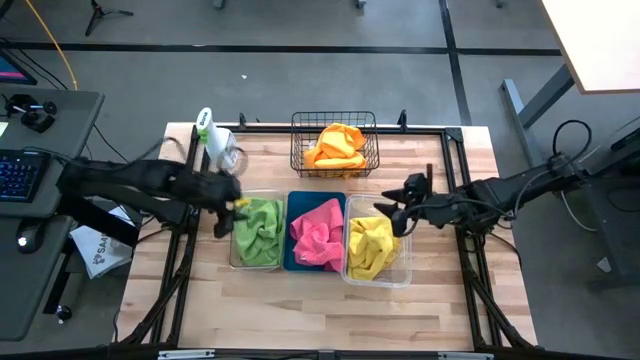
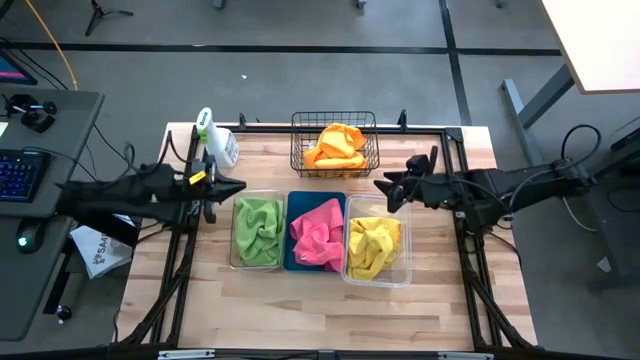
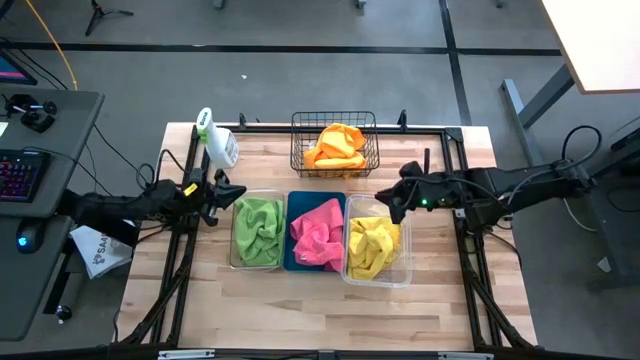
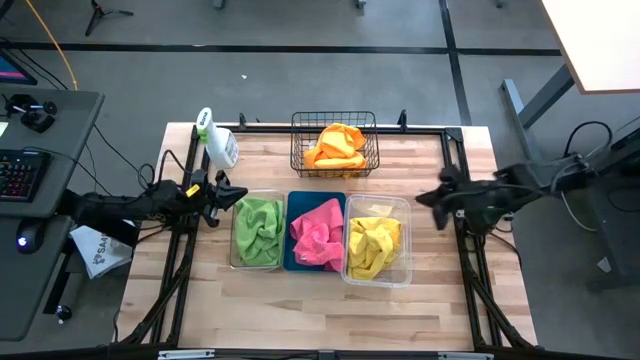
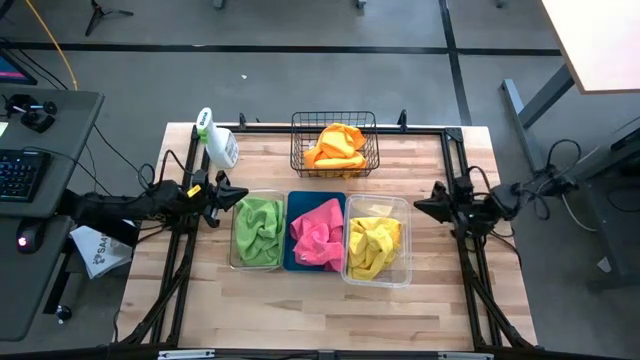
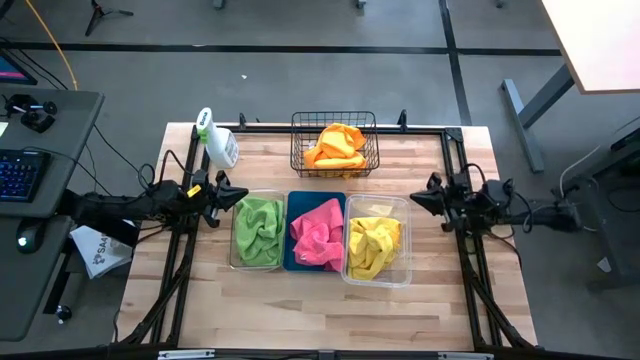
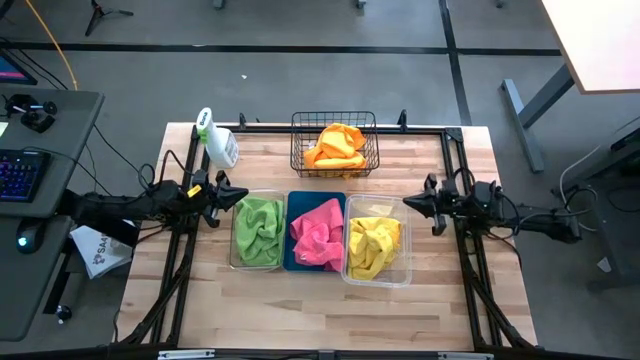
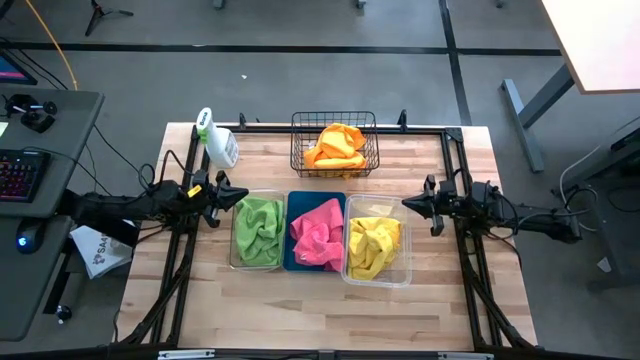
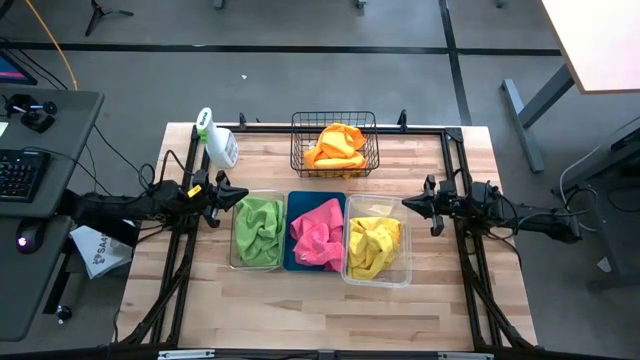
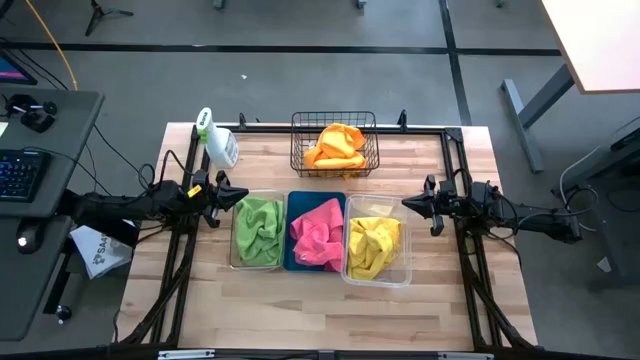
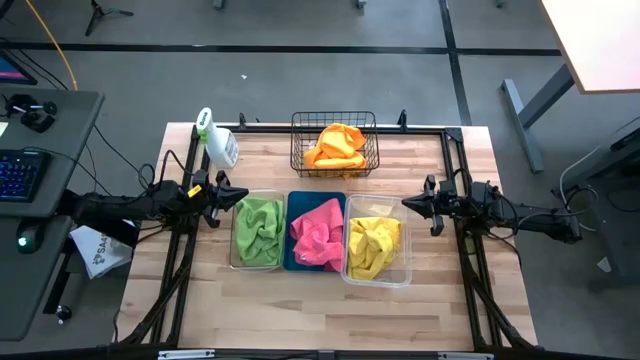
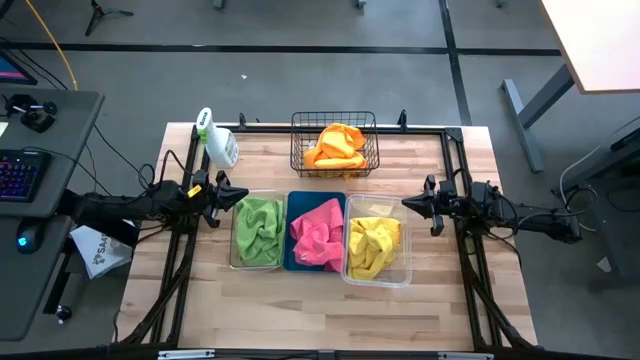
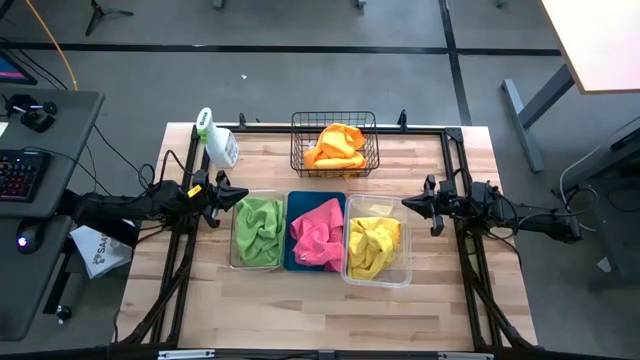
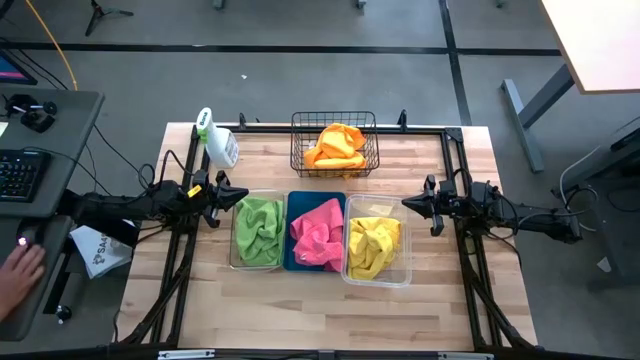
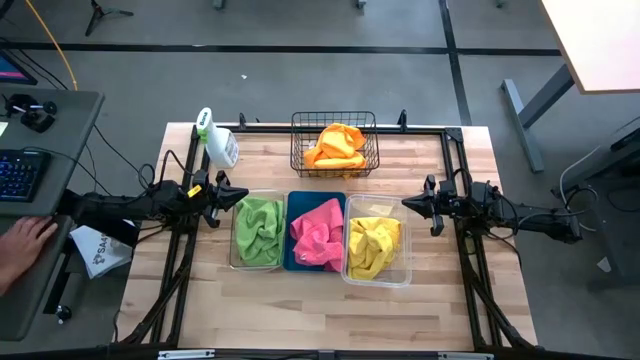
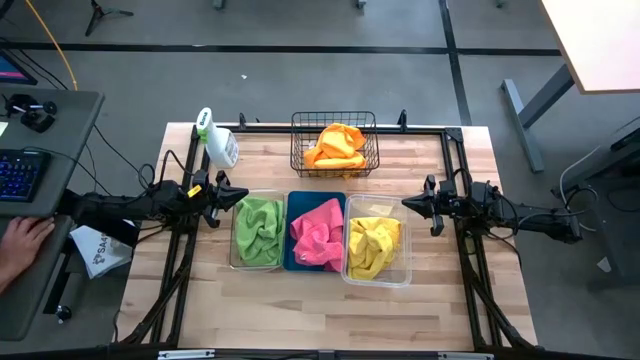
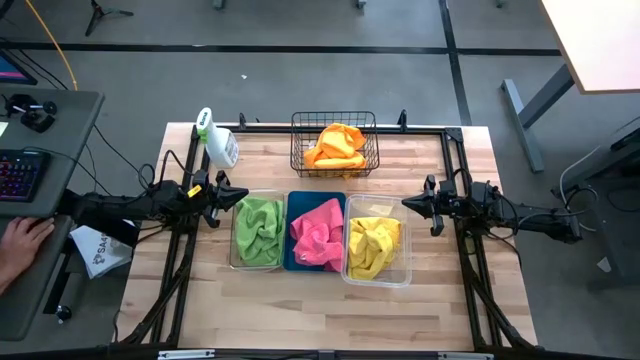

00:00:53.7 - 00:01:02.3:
Task: Sort microfiber towel by color & place in baskets
Return to Home Position

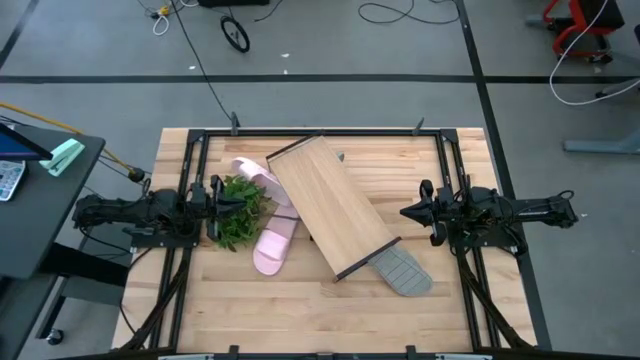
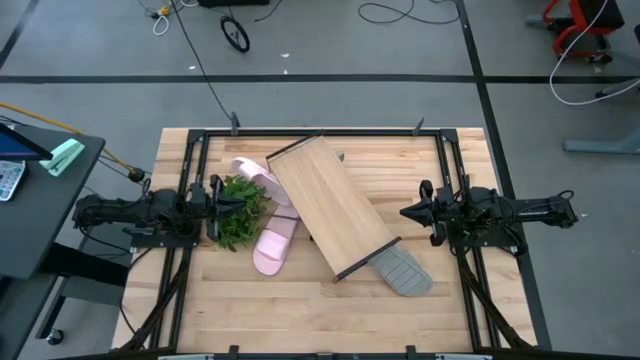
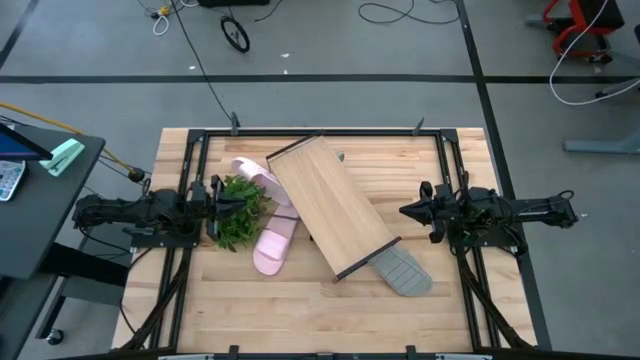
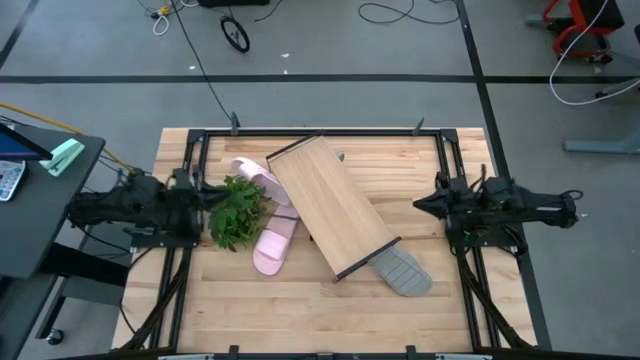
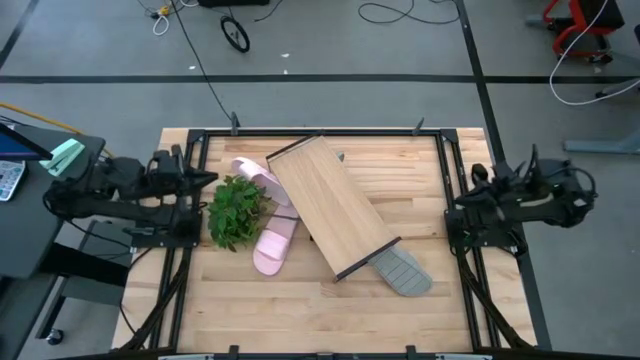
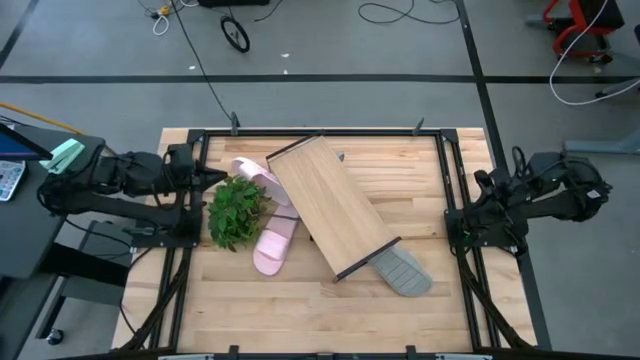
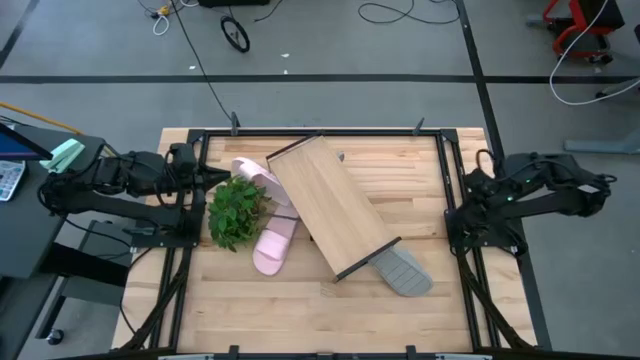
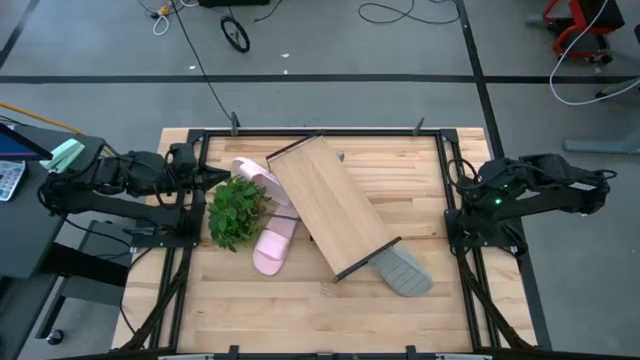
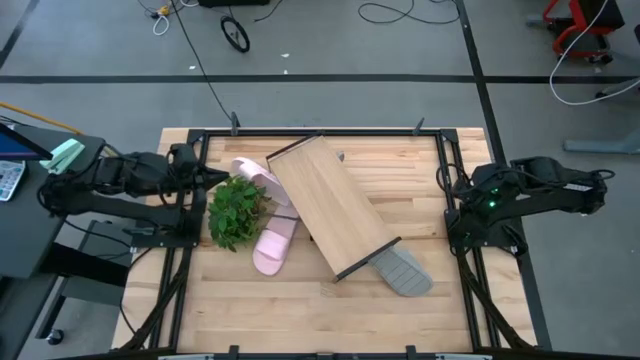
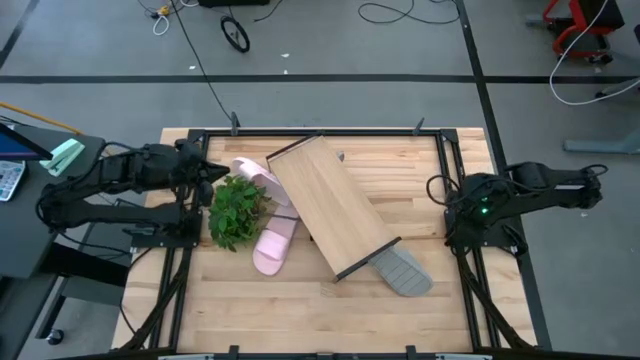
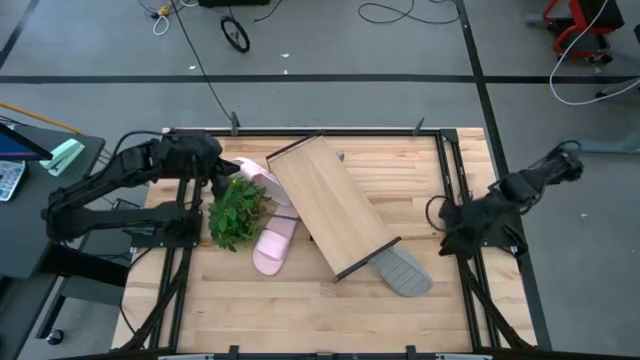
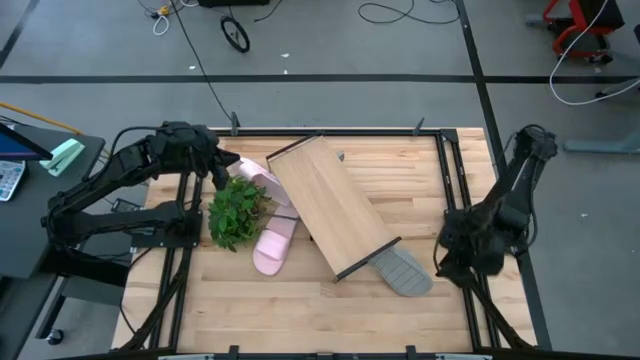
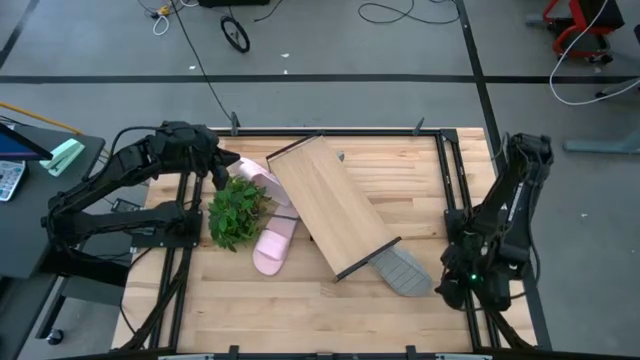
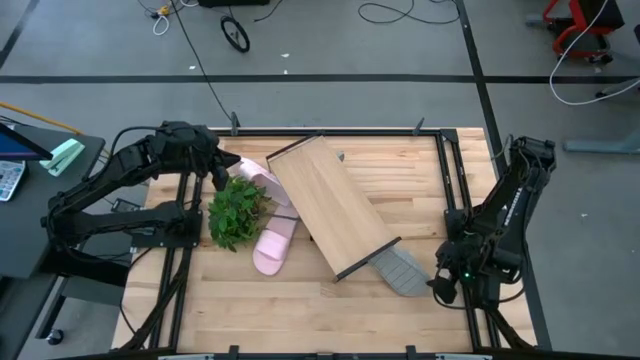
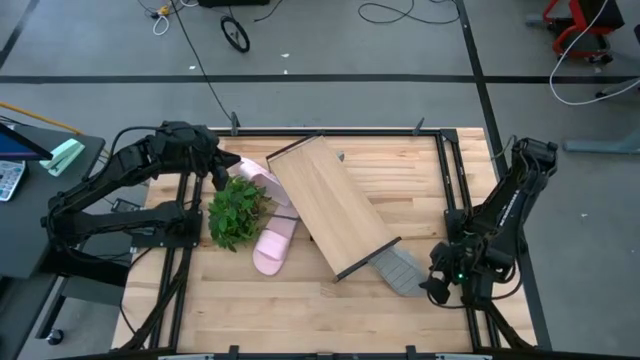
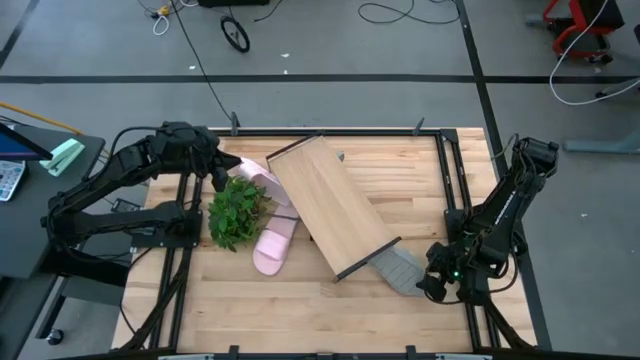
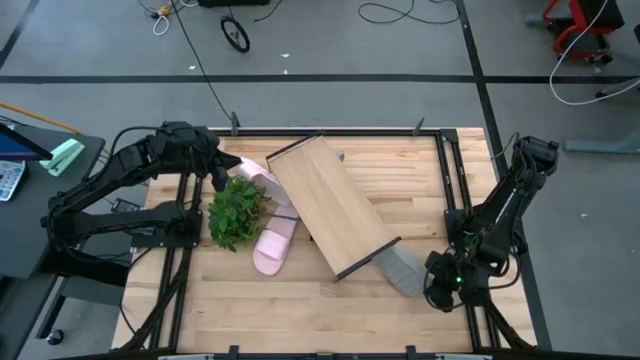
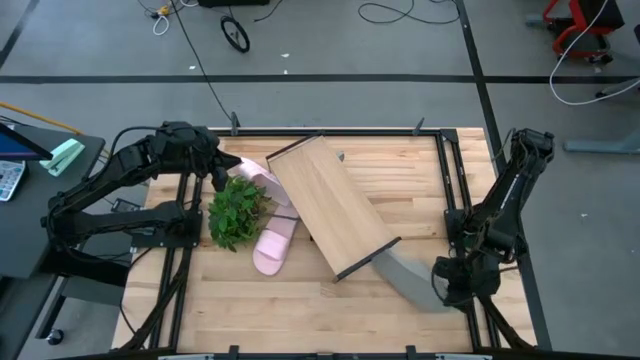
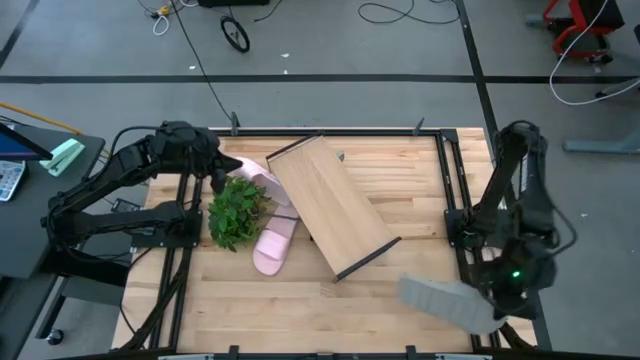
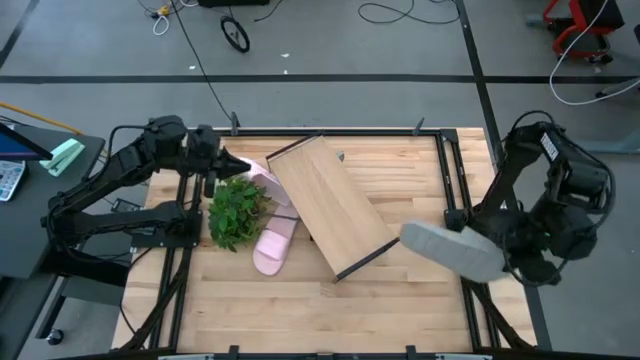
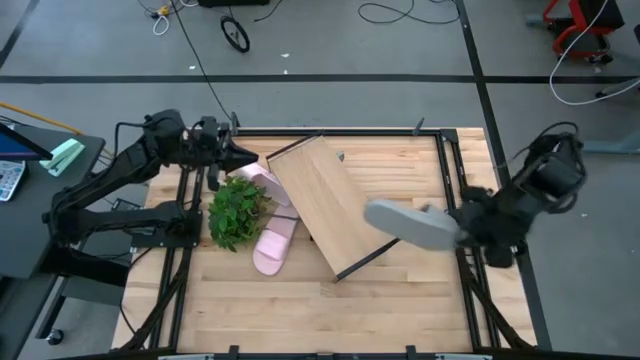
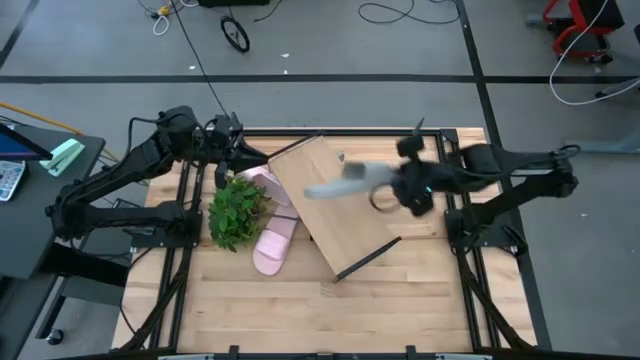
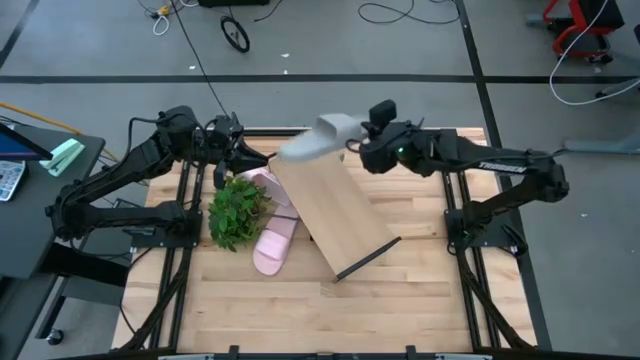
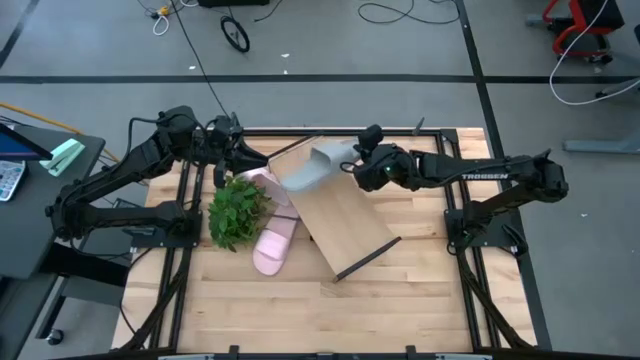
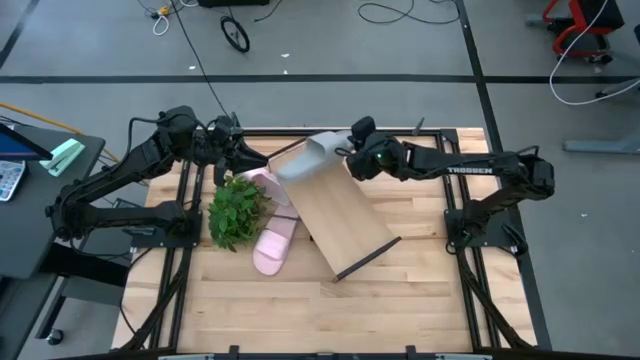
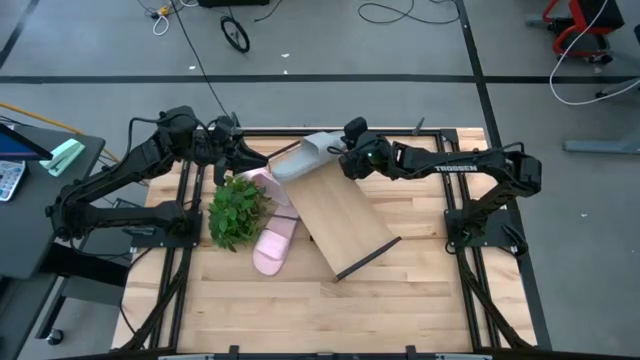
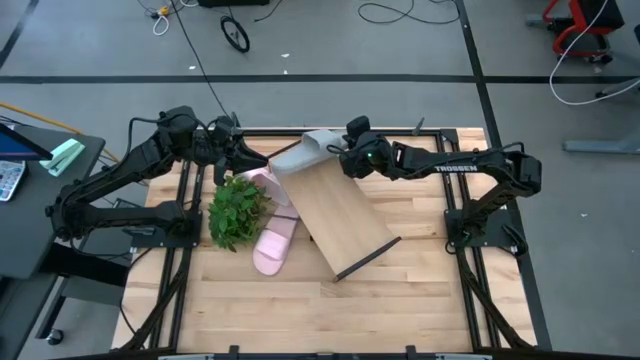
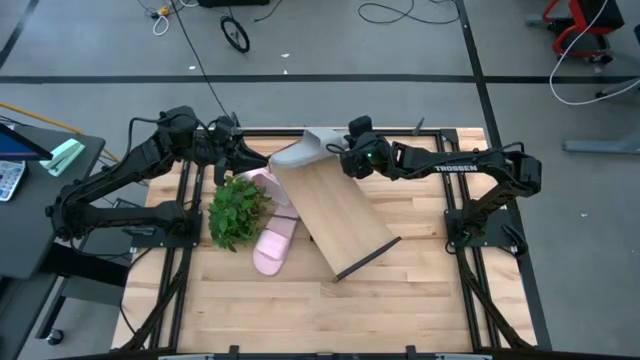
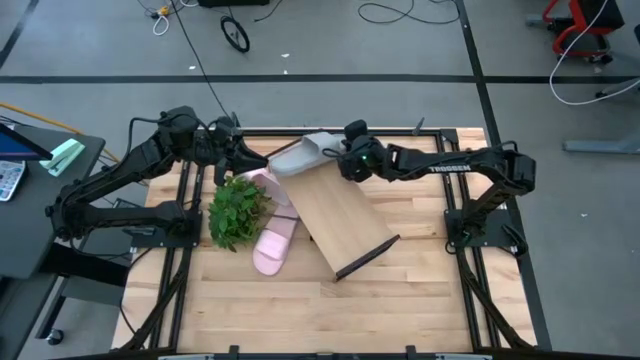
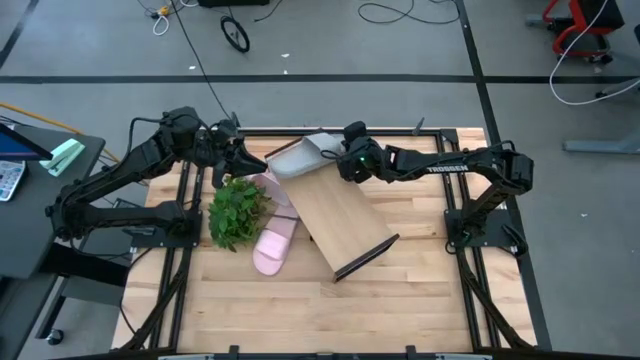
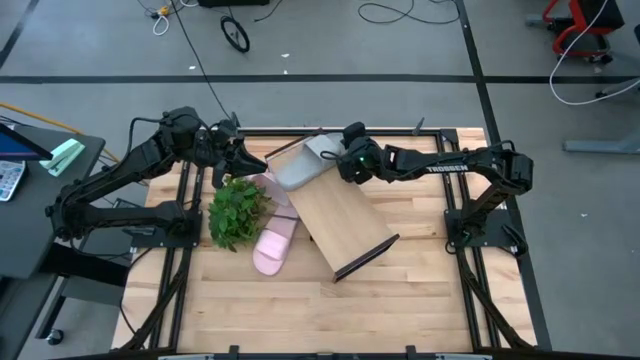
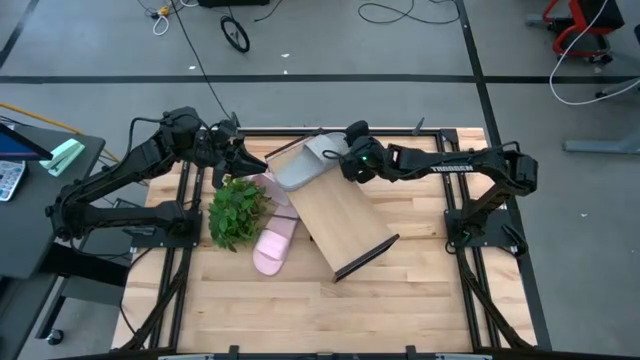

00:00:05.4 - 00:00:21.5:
Task: Pick and place slides into the shelf
Put the bottom gray slide on the shelf
